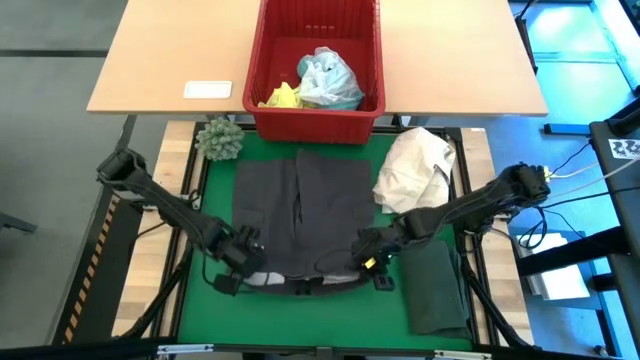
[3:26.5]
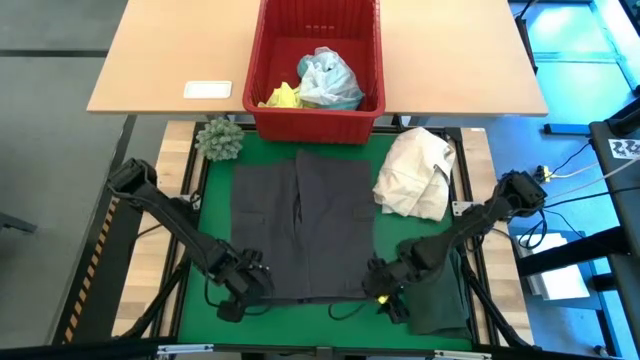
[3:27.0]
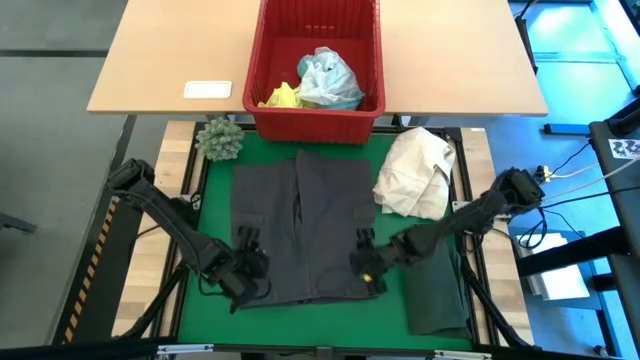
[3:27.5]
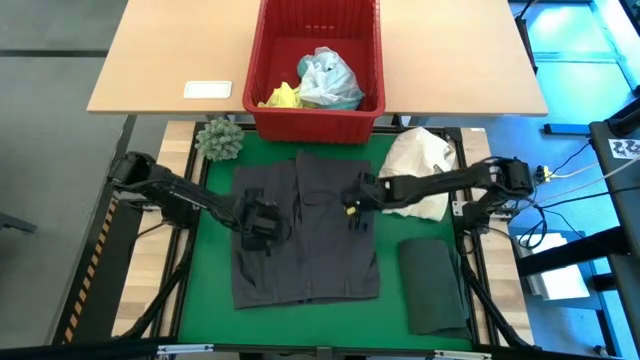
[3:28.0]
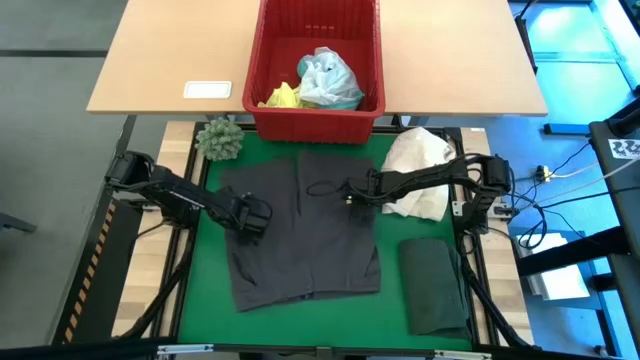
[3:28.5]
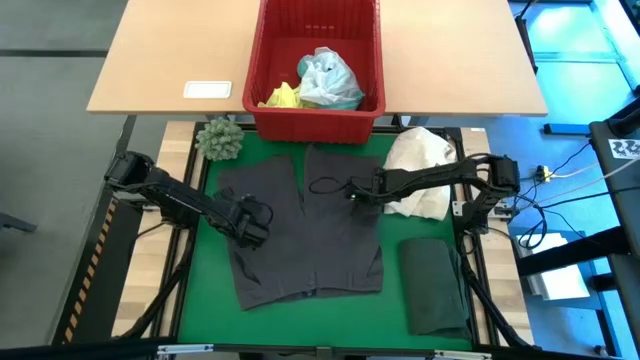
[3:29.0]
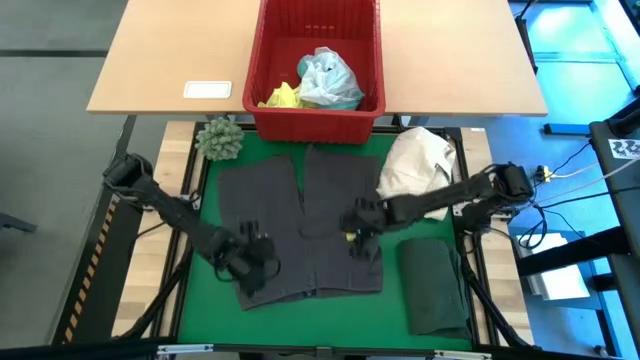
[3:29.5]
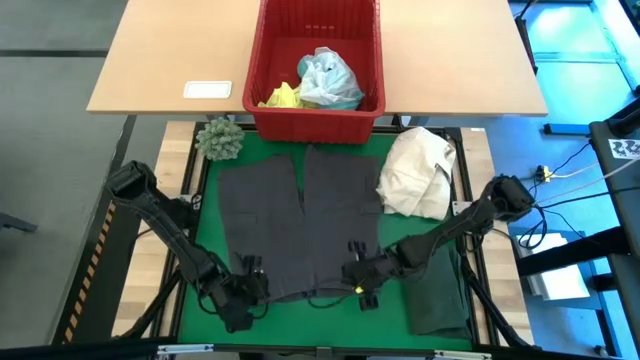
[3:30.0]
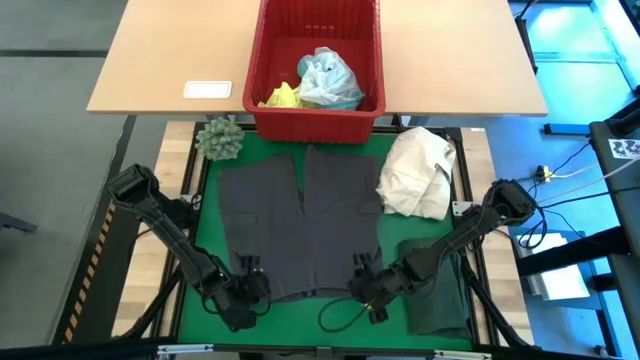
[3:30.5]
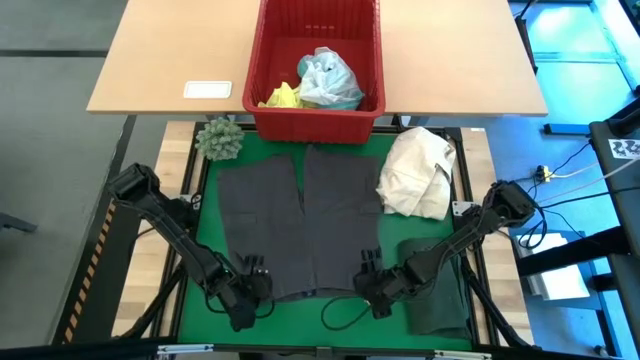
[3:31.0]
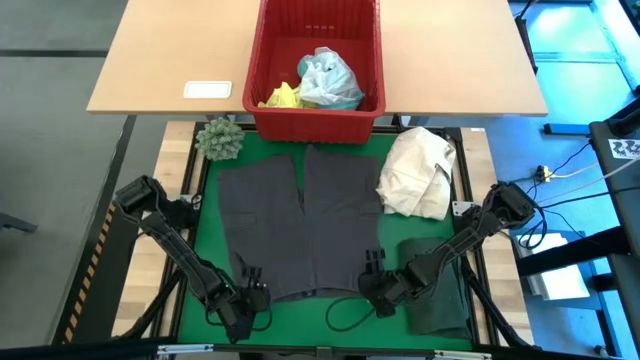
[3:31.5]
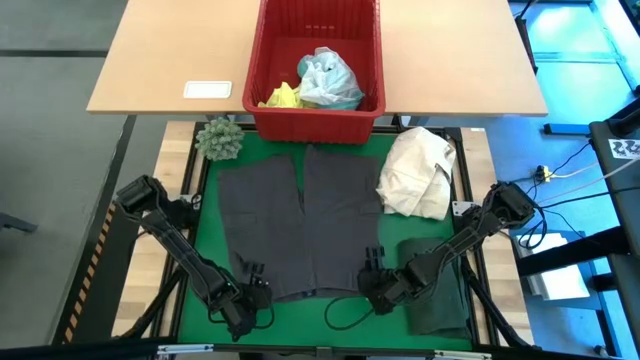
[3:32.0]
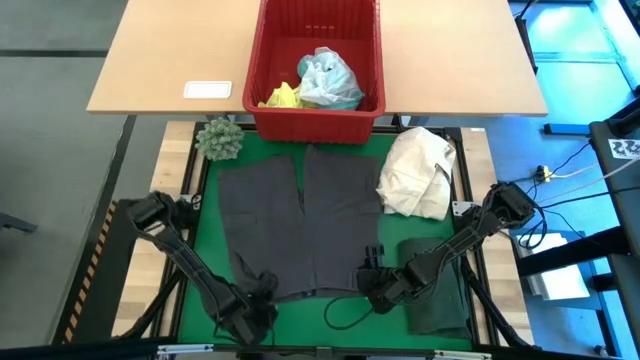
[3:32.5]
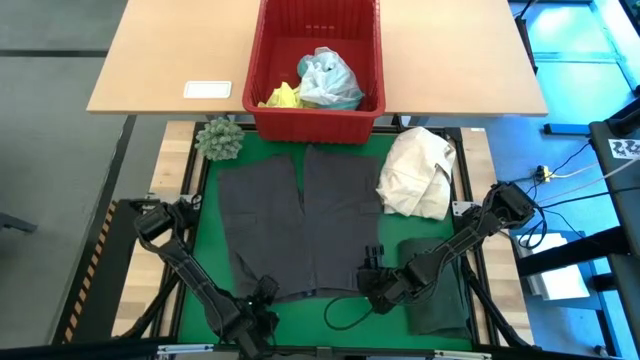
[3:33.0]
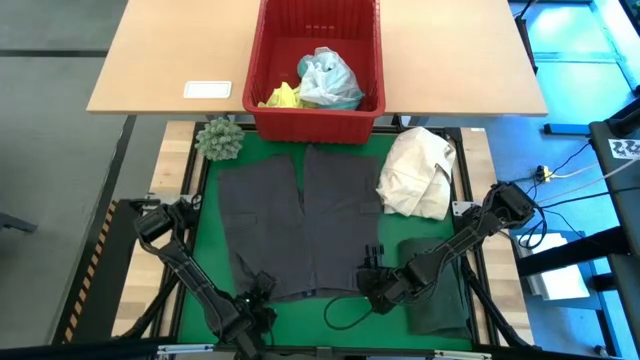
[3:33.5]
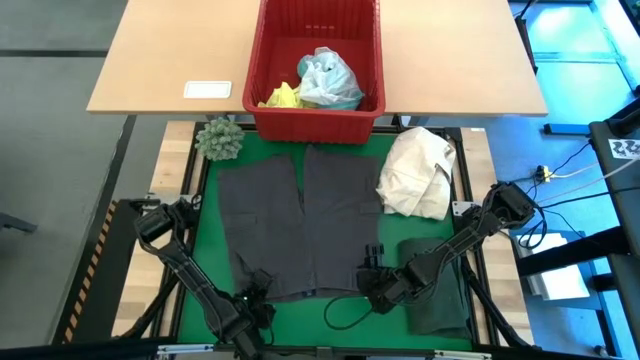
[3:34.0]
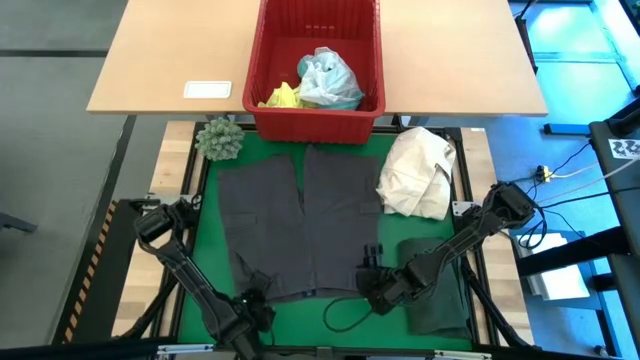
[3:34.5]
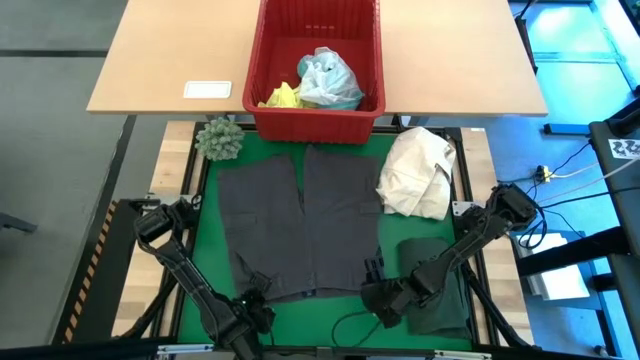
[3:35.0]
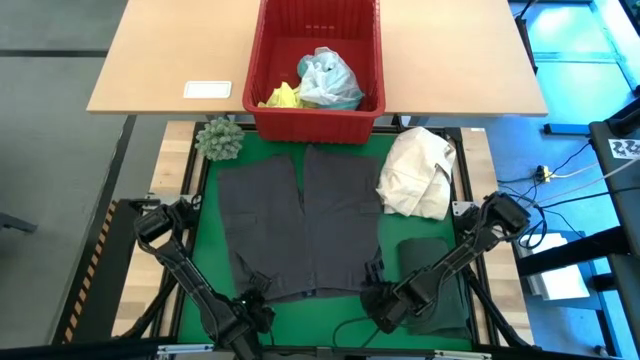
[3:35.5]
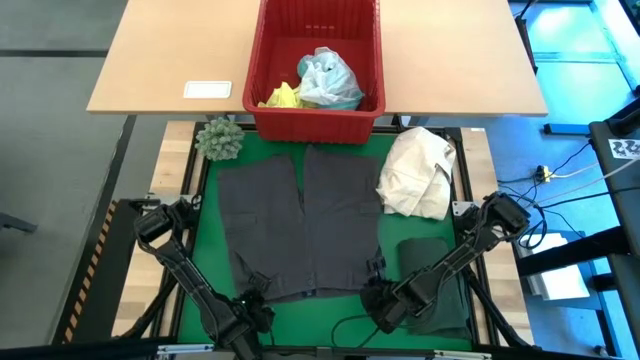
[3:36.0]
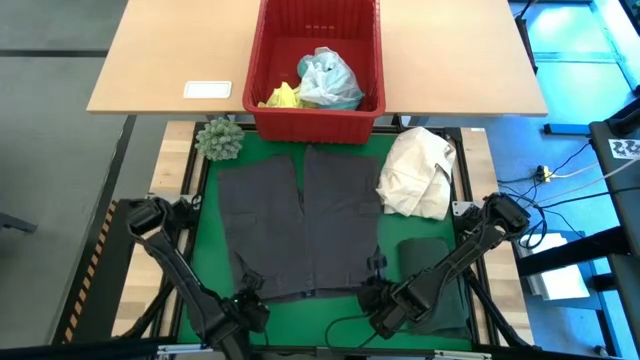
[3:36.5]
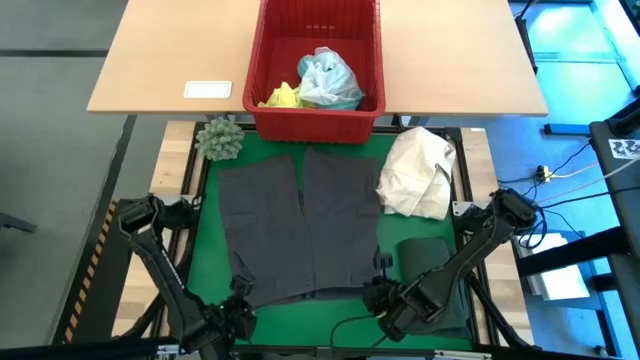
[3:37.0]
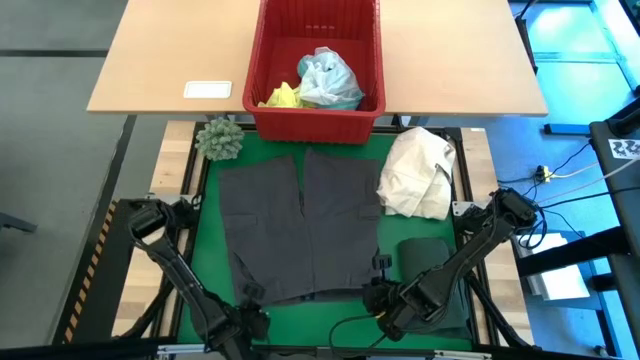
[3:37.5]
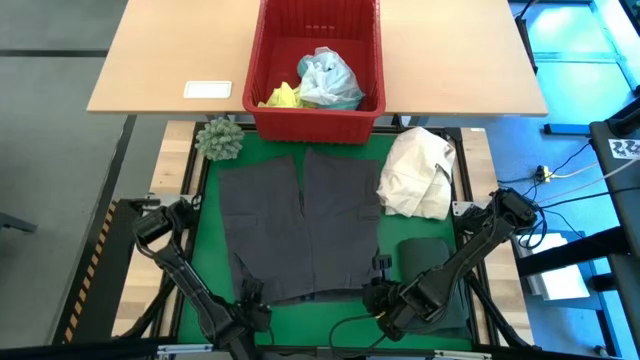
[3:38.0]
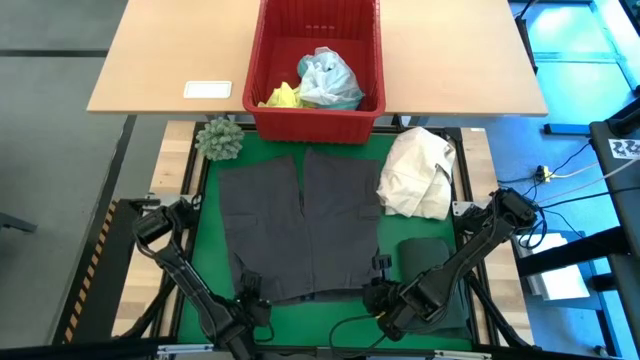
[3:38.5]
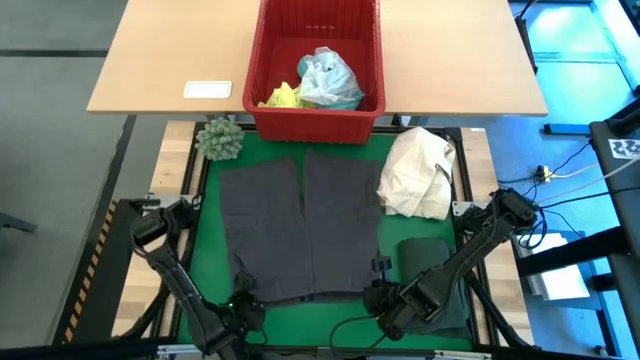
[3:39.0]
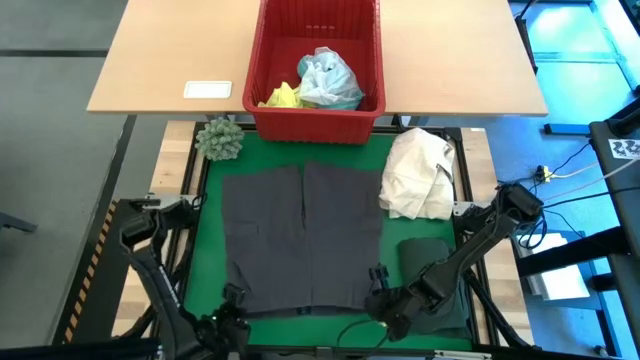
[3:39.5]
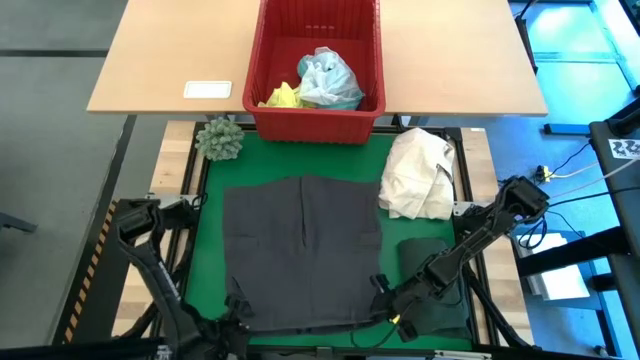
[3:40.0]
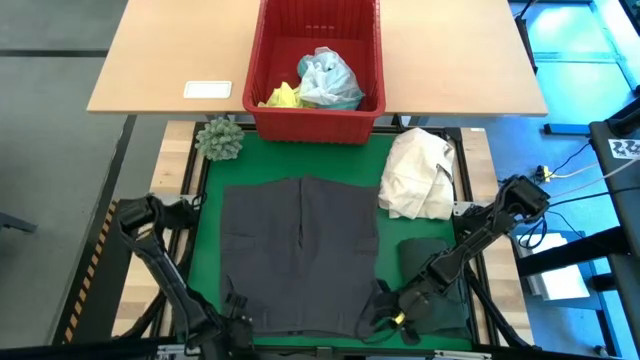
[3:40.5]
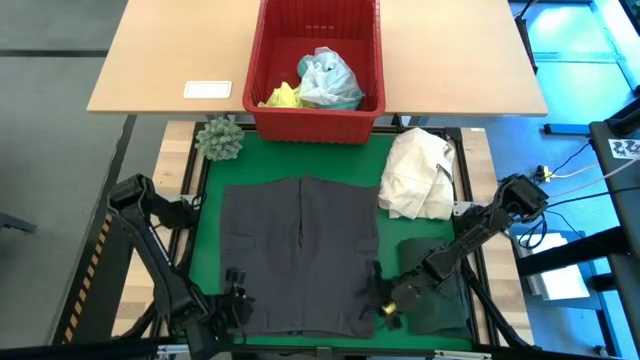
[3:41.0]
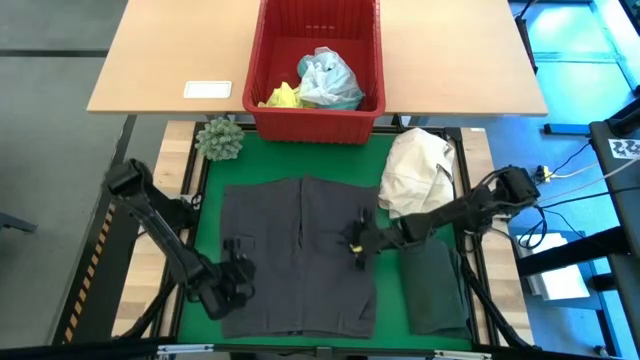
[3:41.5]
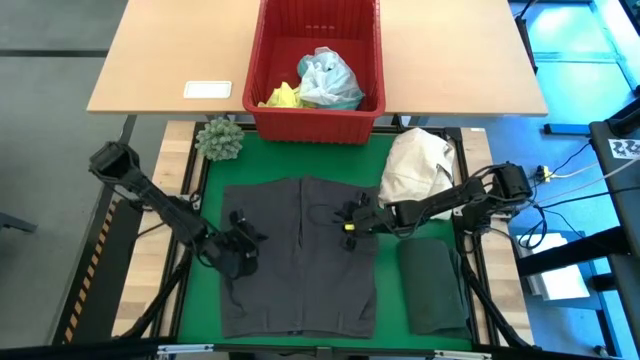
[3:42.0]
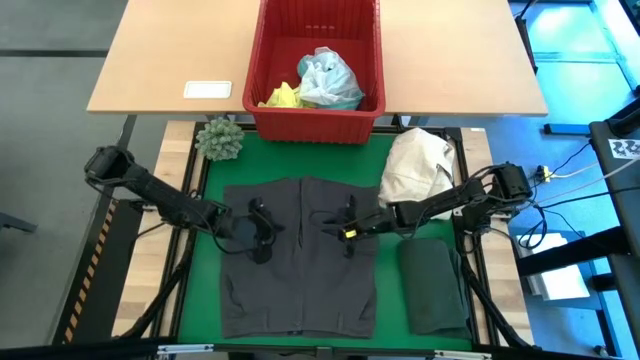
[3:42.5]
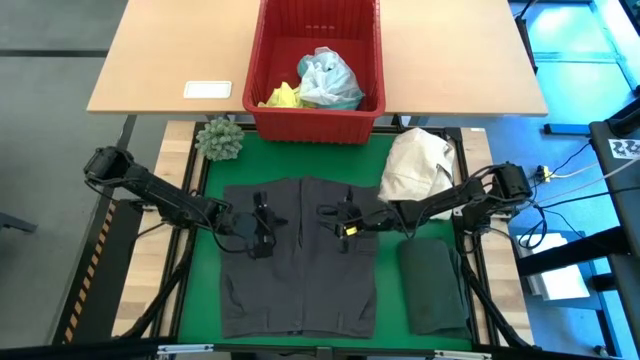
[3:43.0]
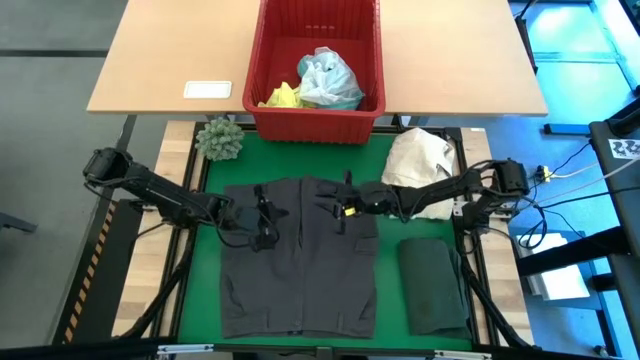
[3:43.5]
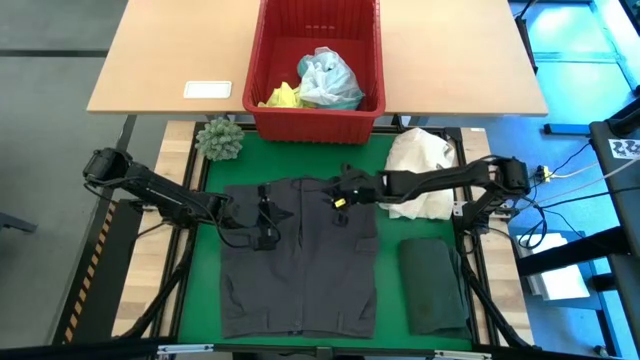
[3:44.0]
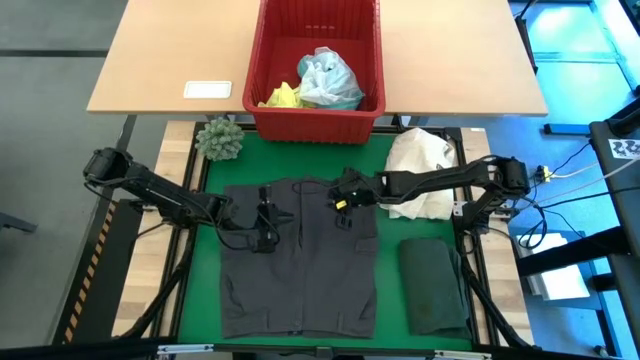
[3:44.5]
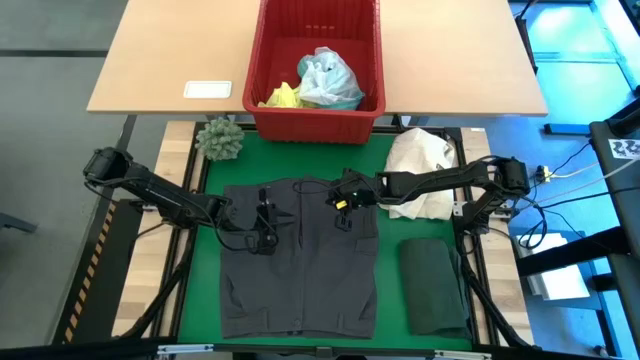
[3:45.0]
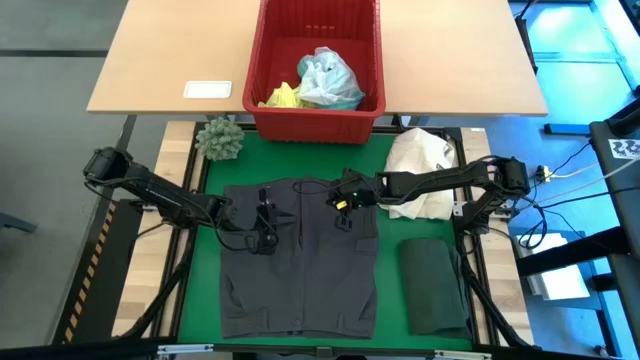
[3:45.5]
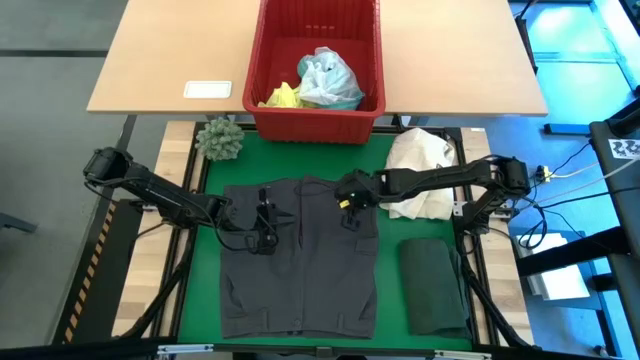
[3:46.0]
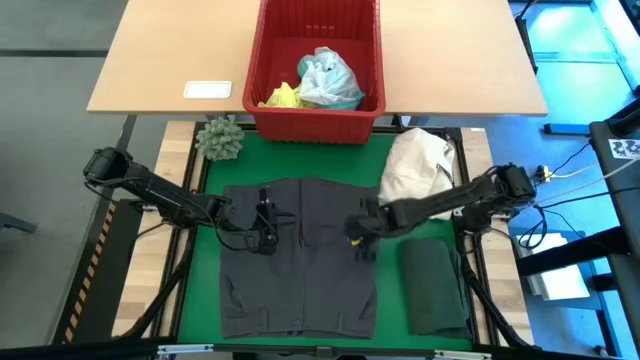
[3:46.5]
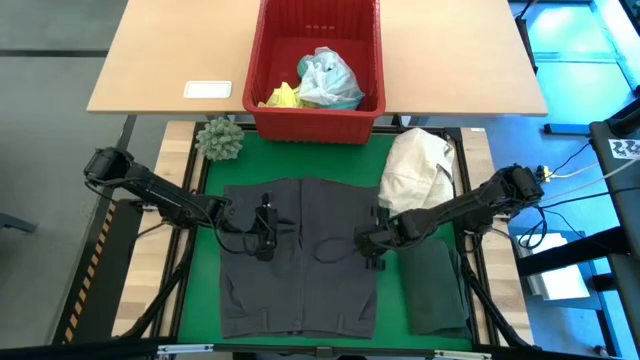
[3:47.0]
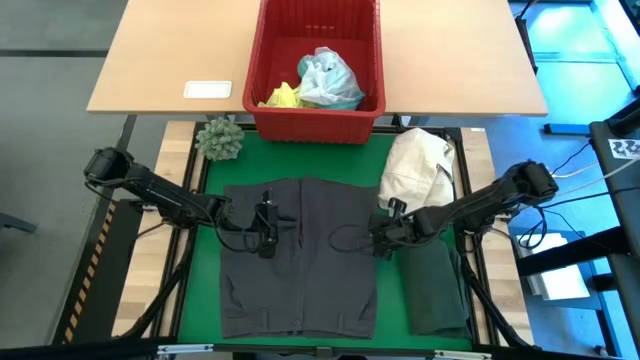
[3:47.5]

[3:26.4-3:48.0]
Task: Fold Laundry from Bin
Fold the gray short
